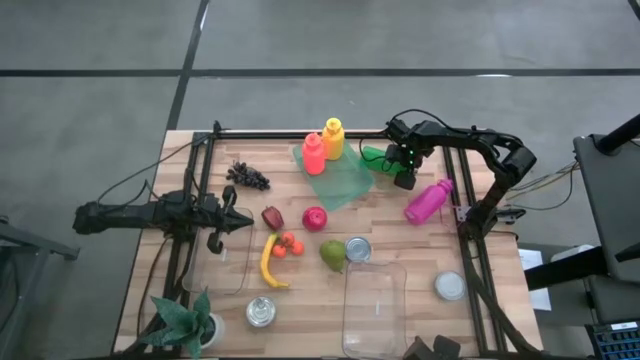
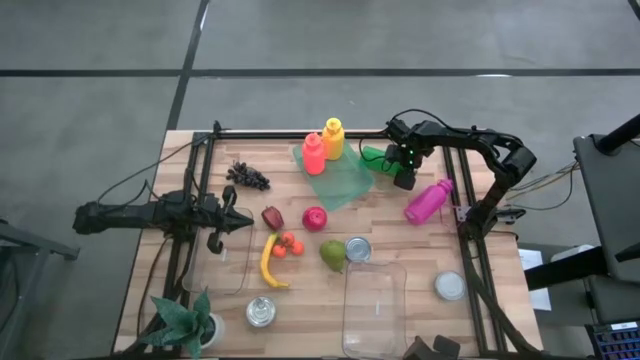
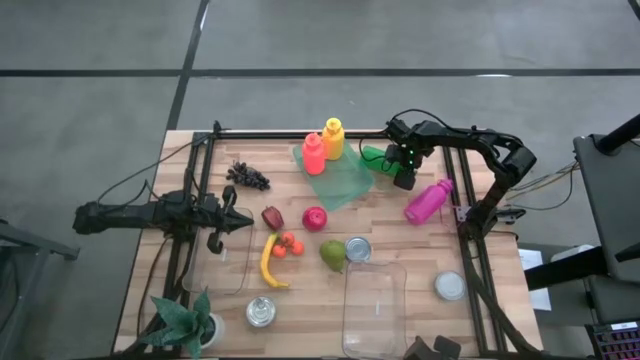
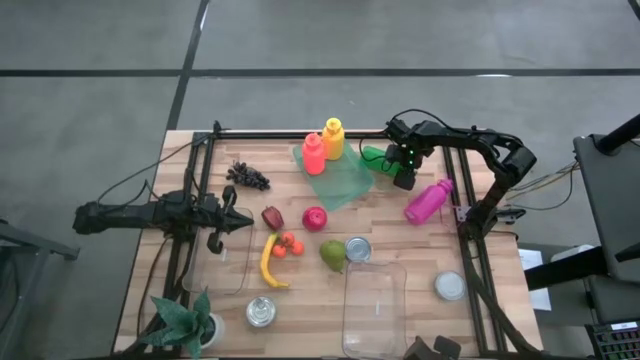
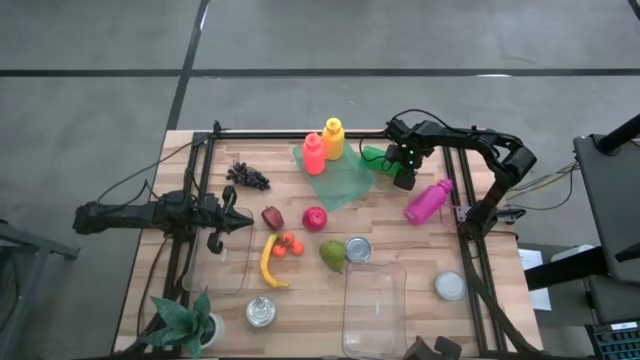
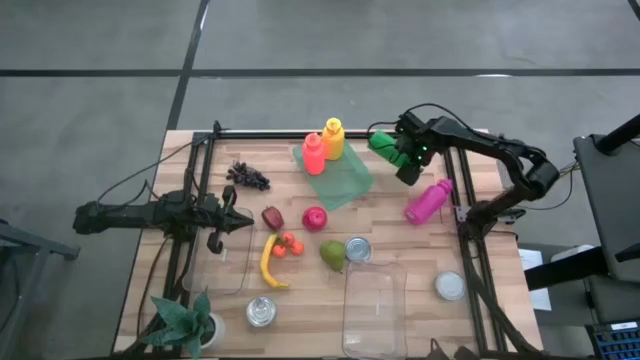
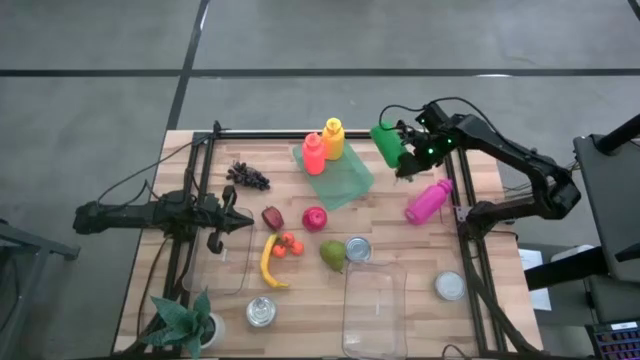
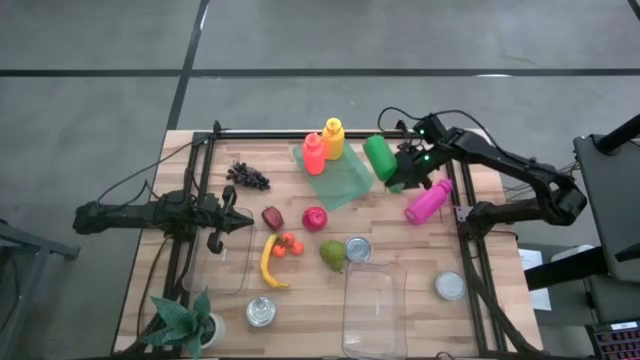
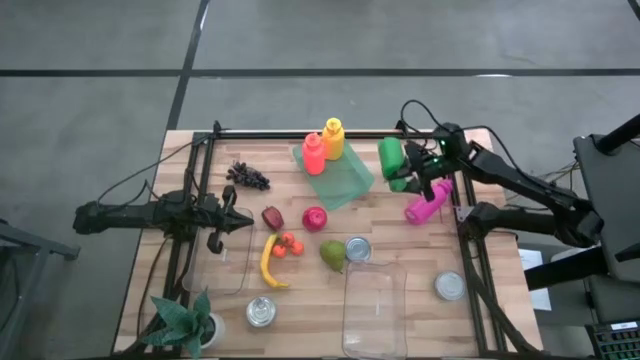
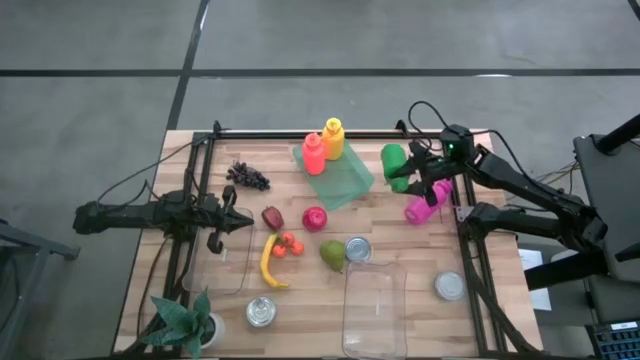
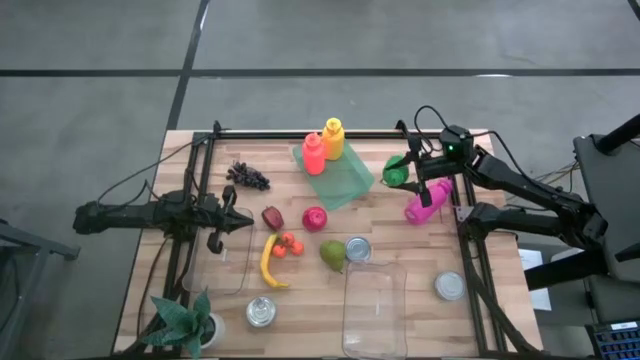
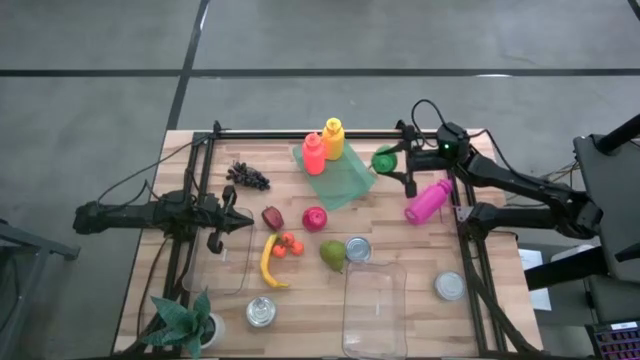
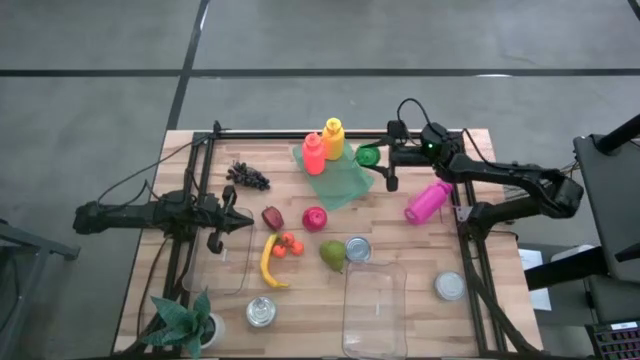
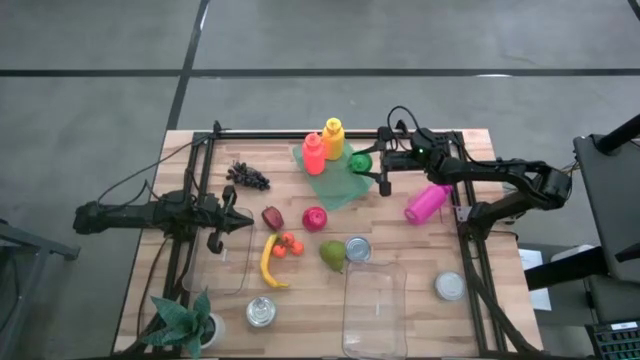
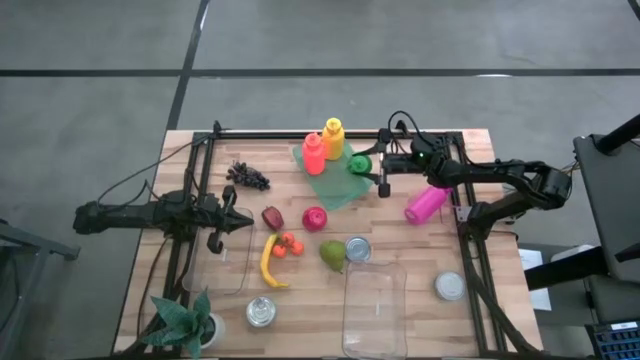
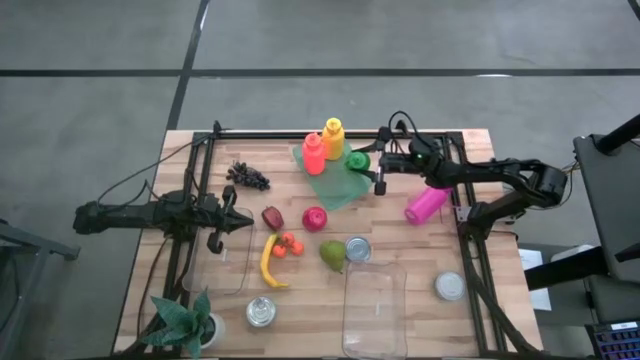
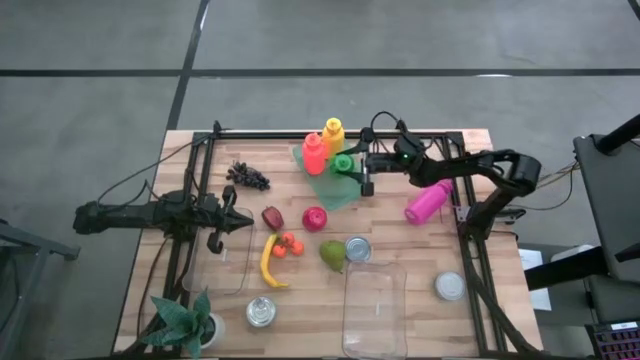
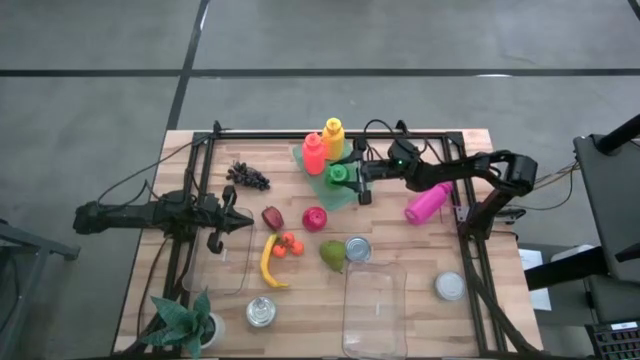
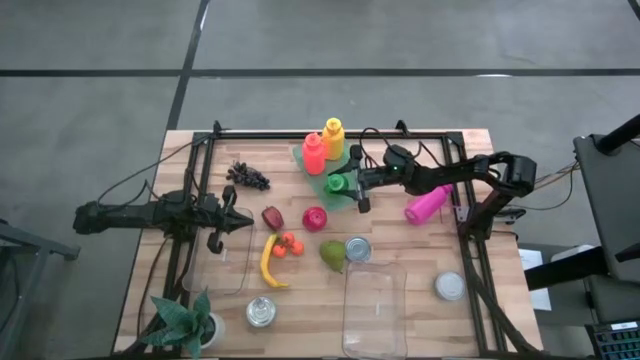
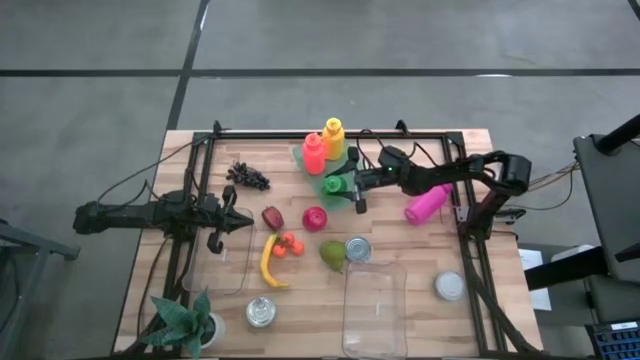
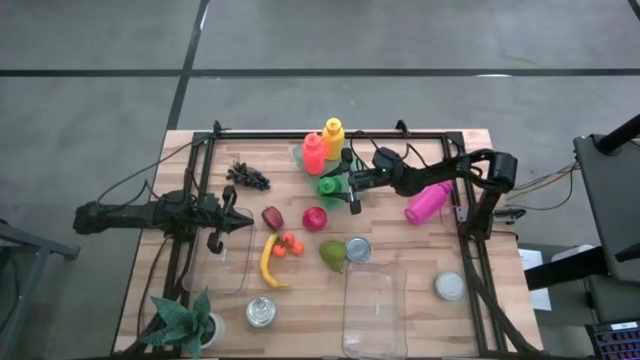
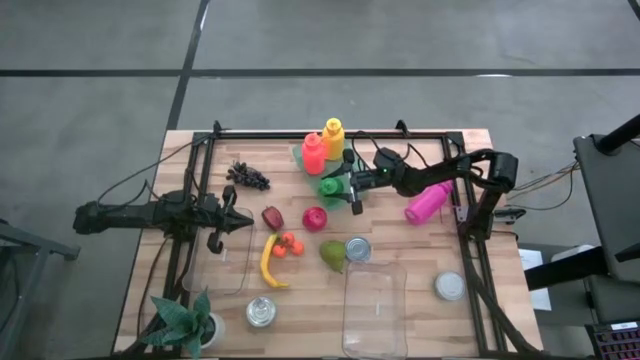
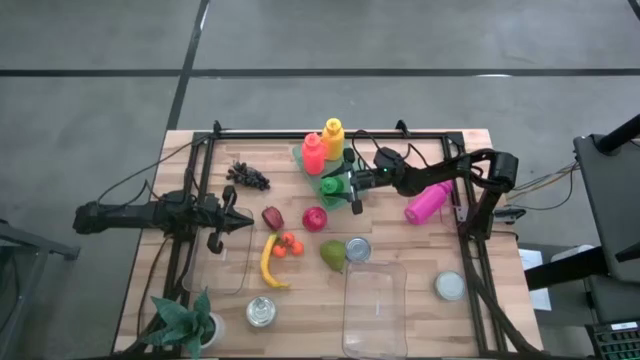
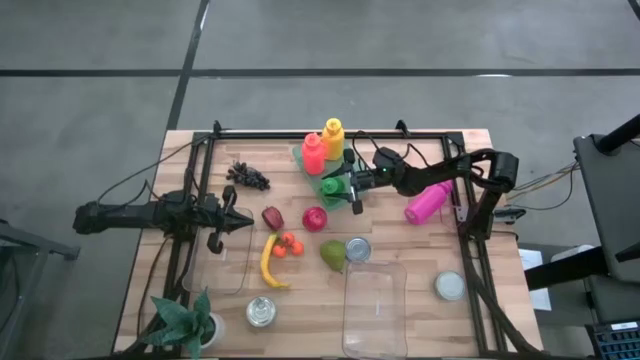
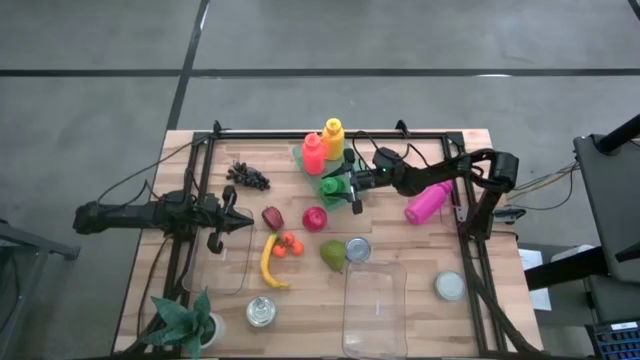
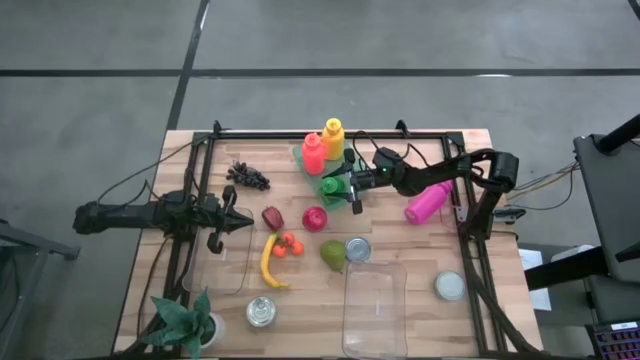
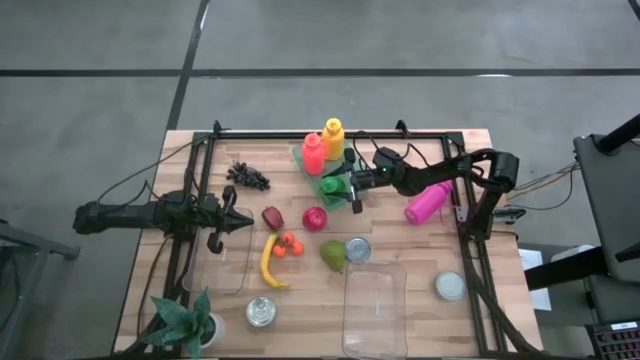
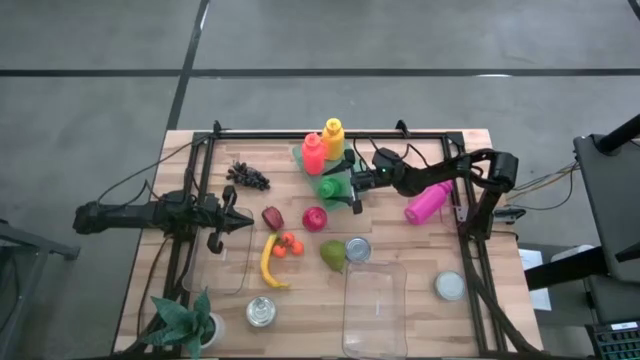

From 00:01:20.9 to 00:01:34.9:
Task: Pick & Place Food Item
Put the green water bottle into the green bin

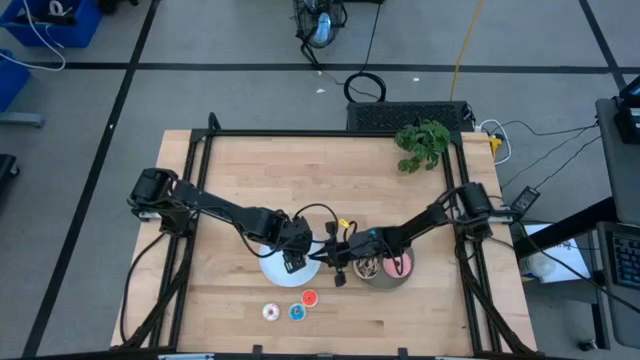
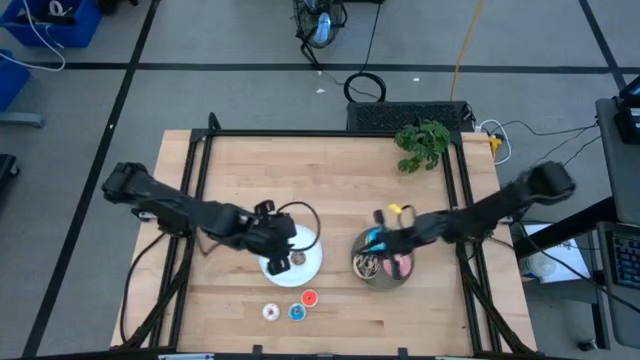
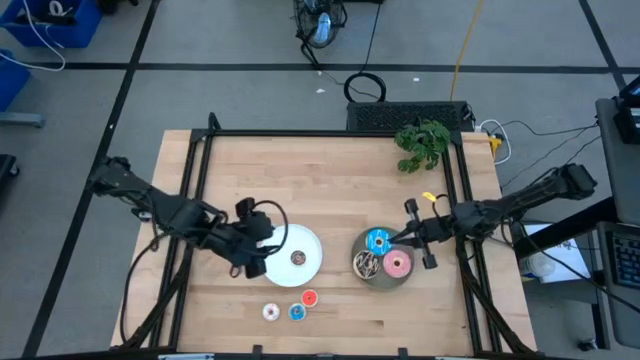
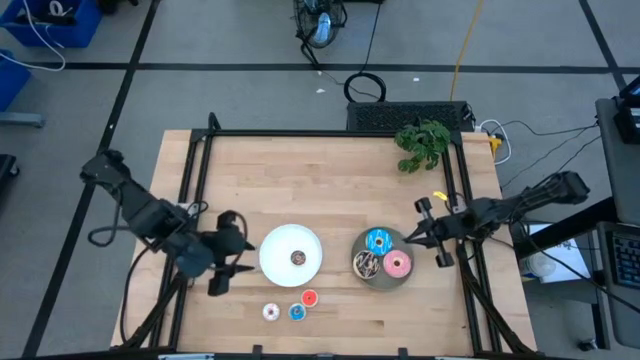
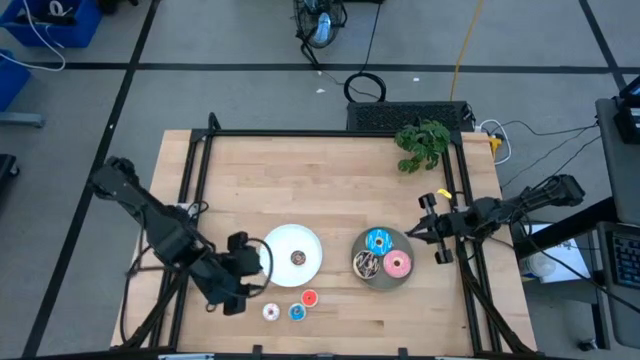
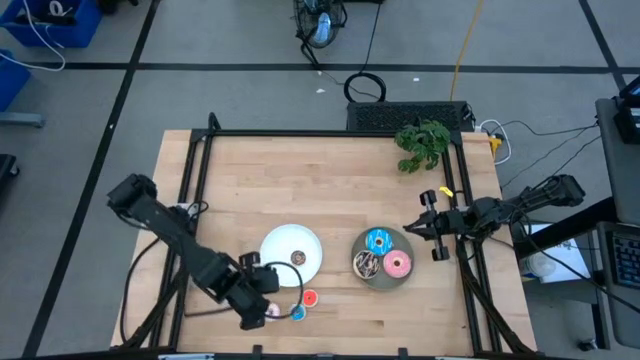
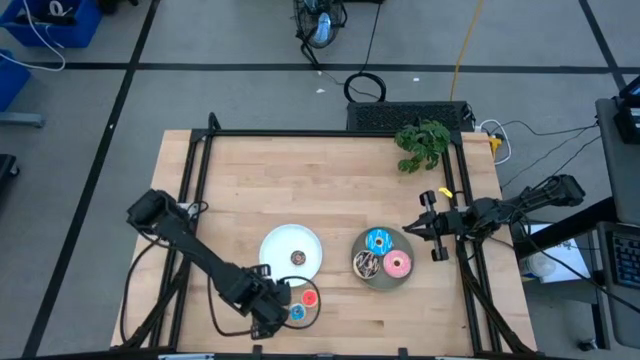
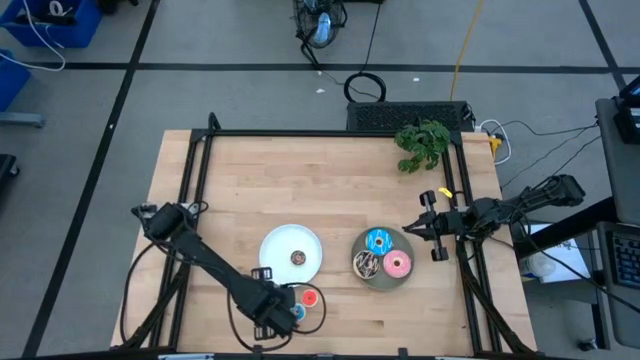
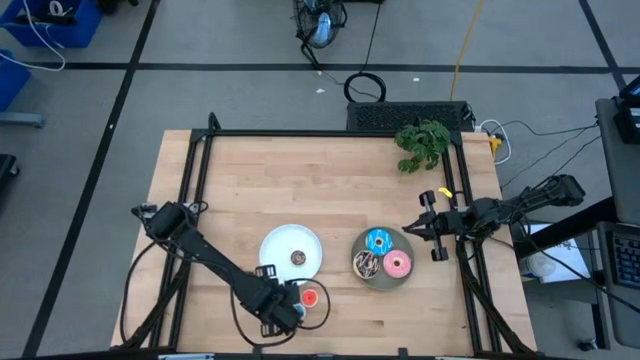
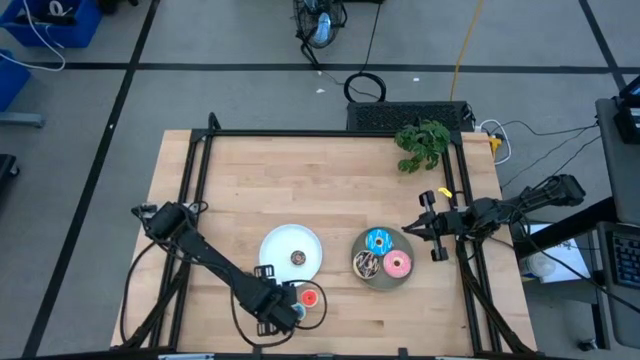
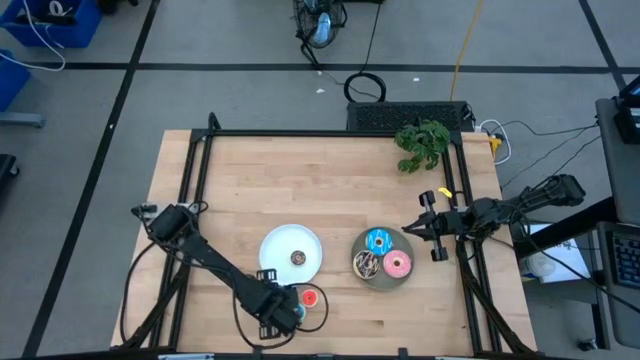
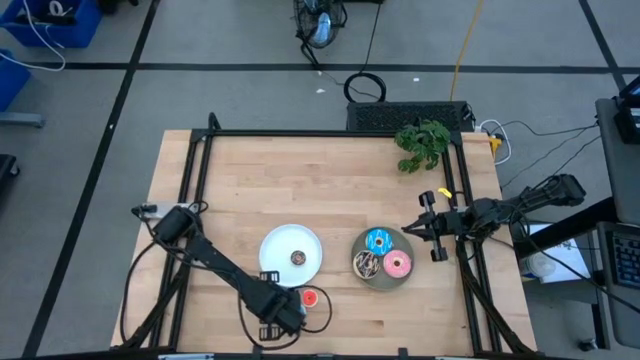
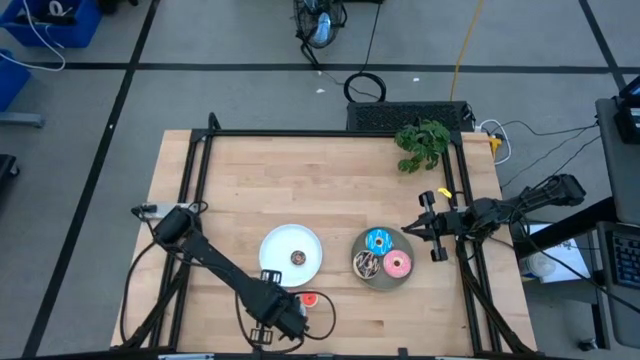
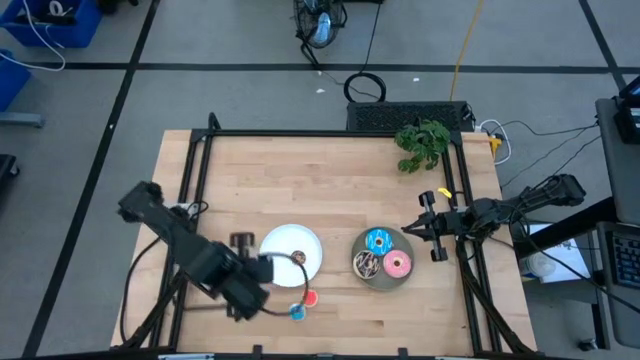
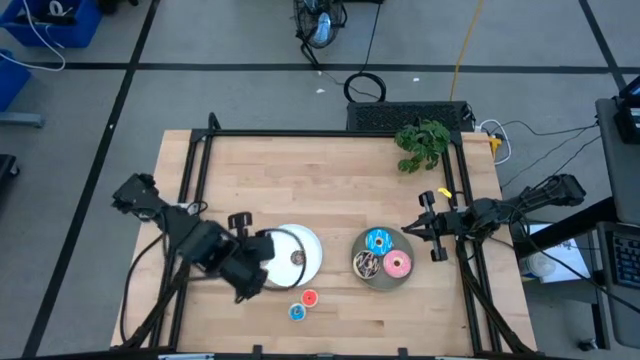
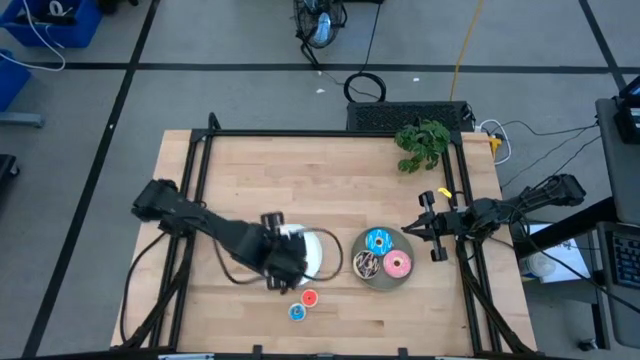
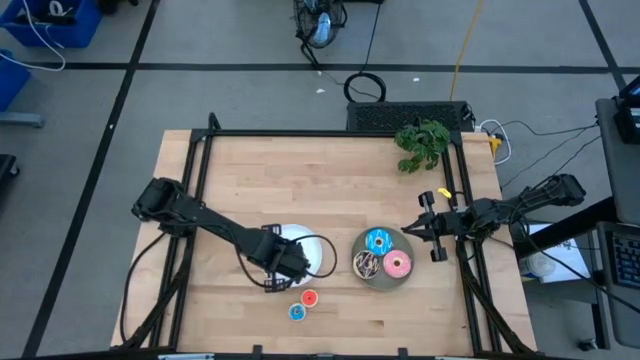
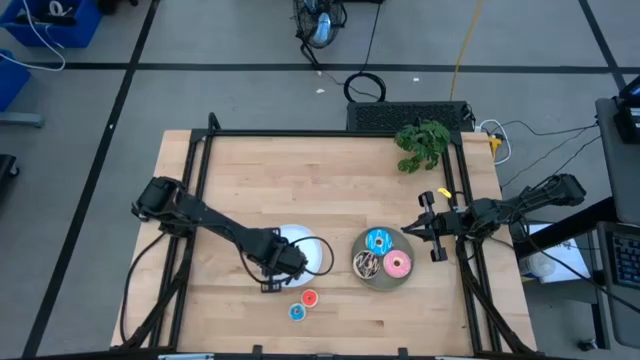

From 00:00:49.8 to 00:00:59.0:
Task: Pick & Place donuts
Put the small brown donut on the white plate
